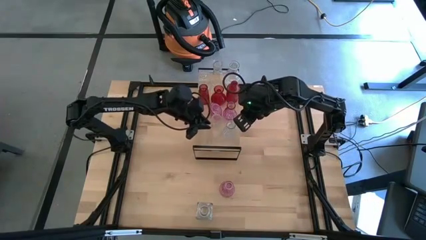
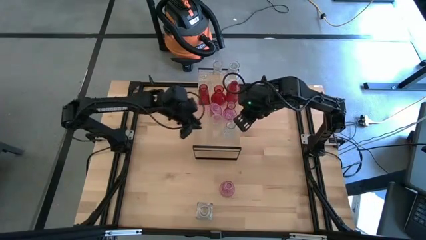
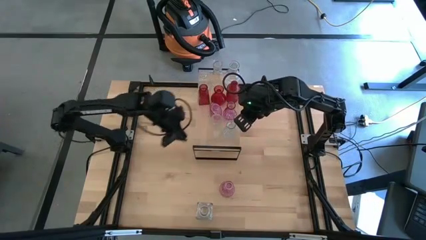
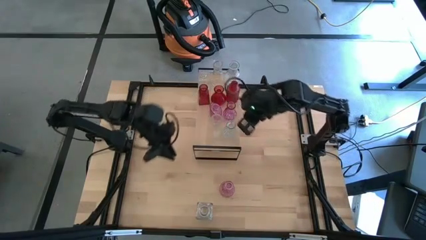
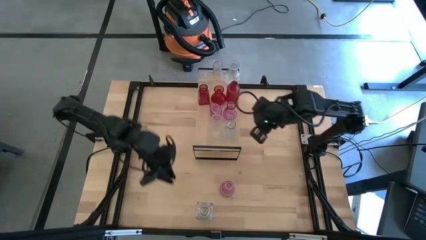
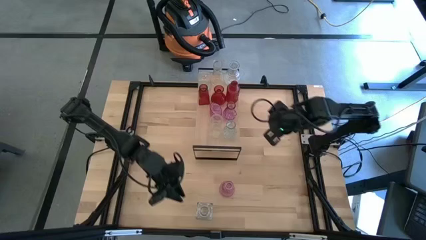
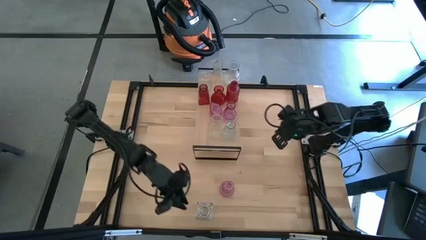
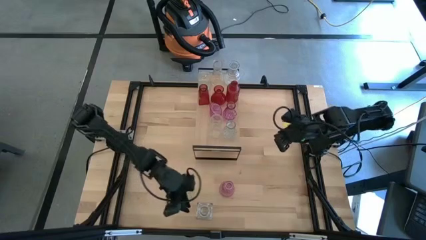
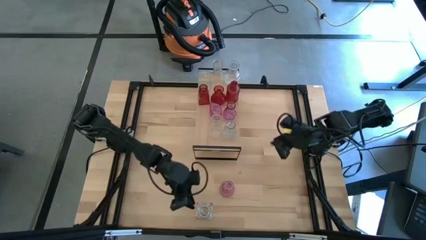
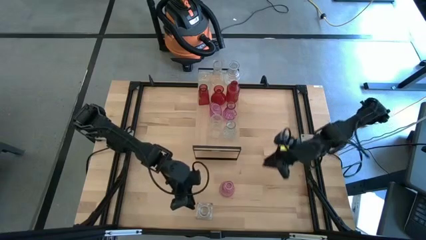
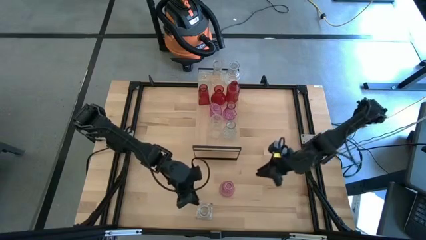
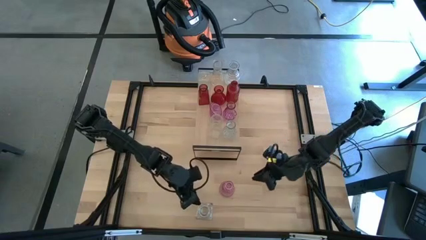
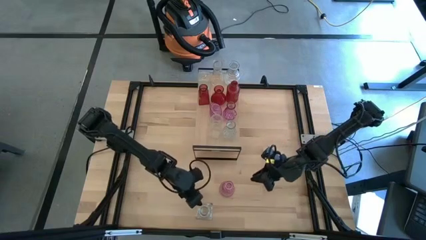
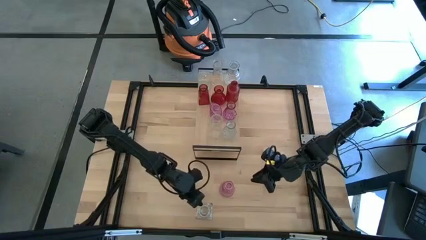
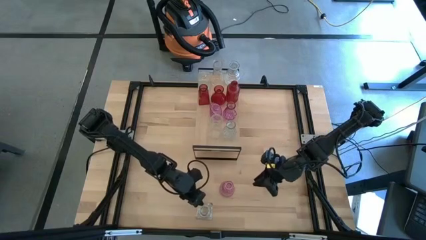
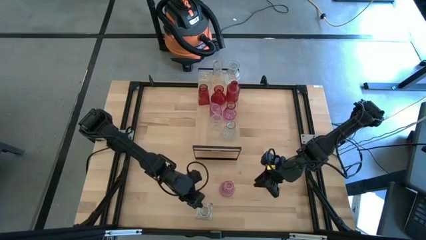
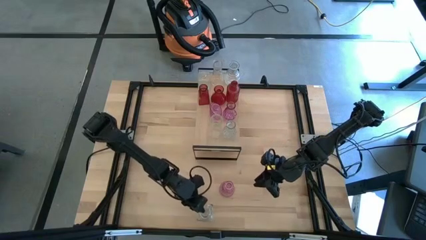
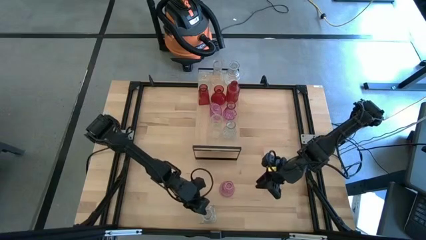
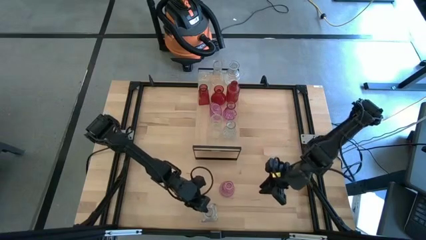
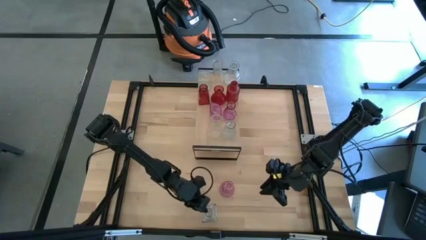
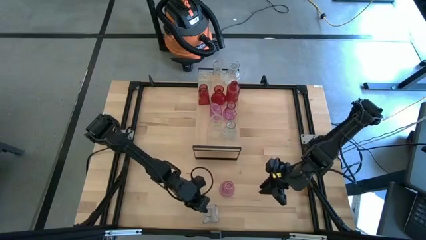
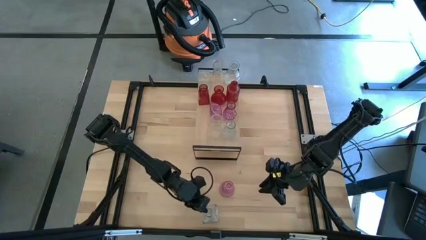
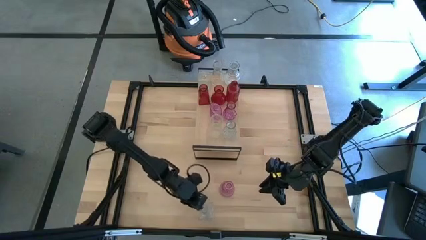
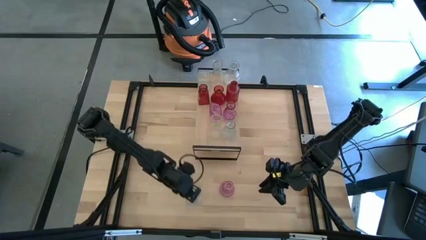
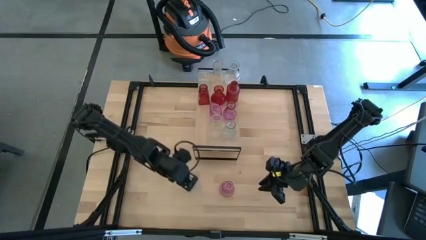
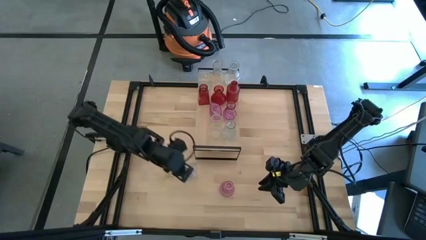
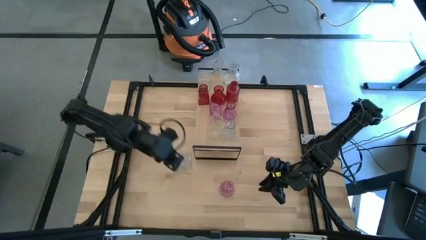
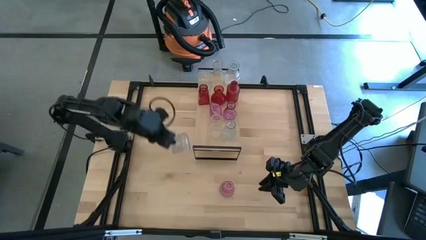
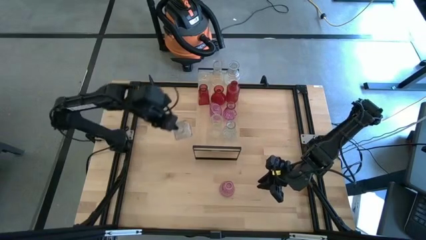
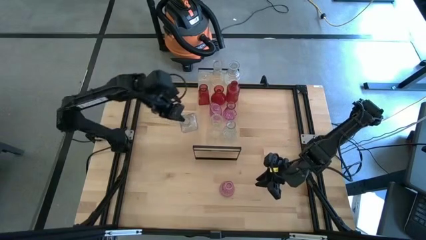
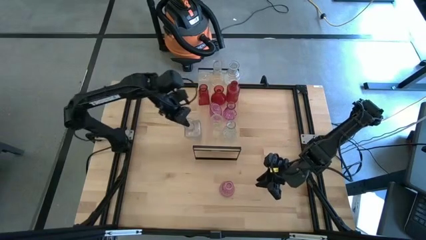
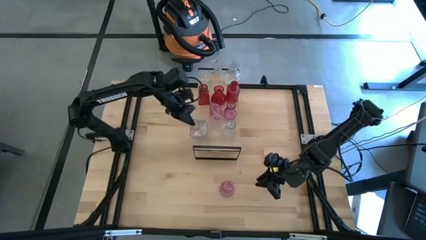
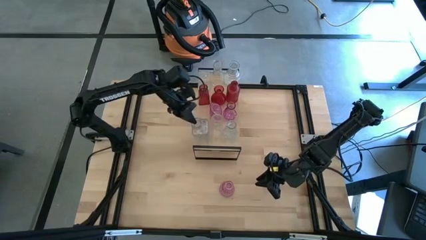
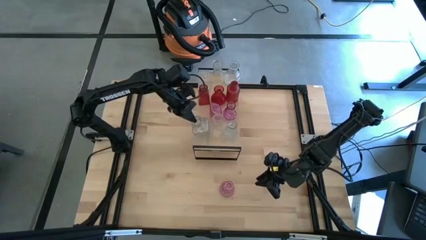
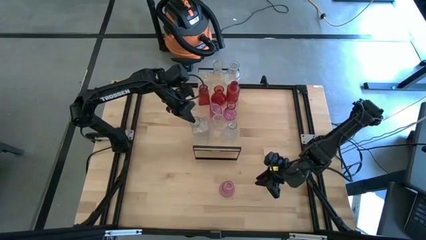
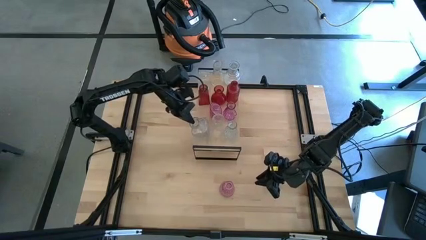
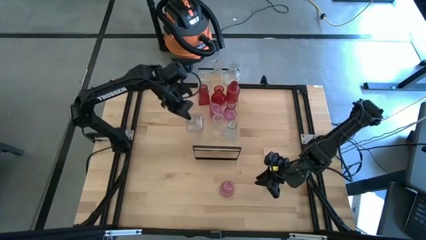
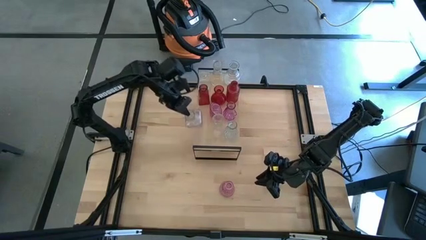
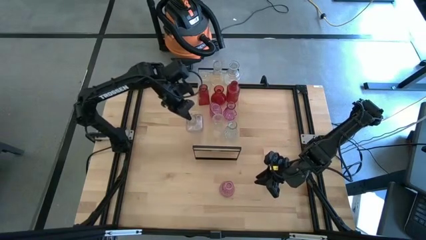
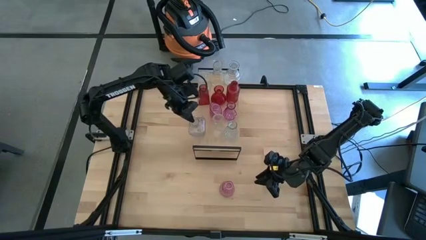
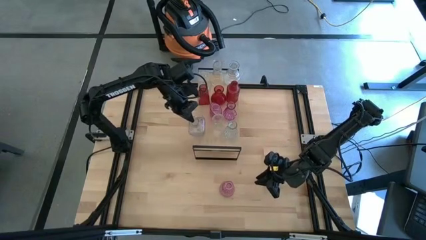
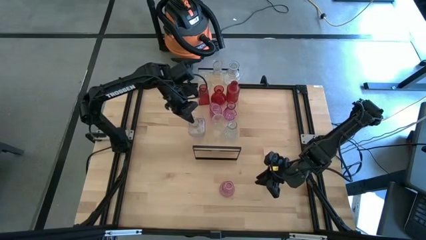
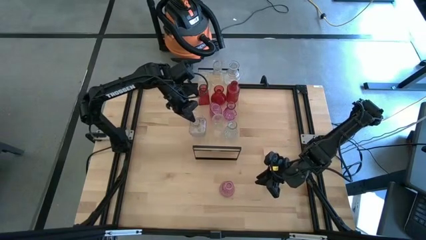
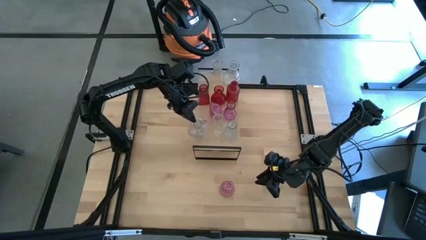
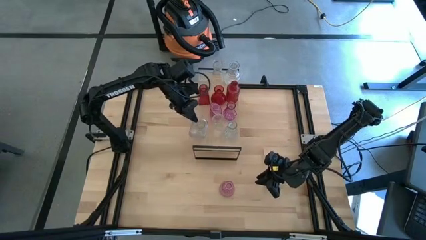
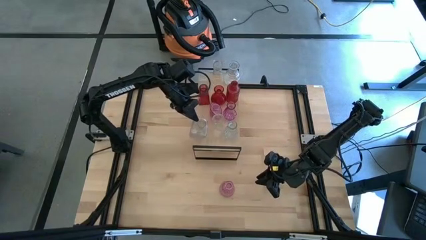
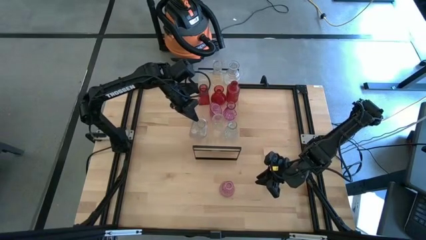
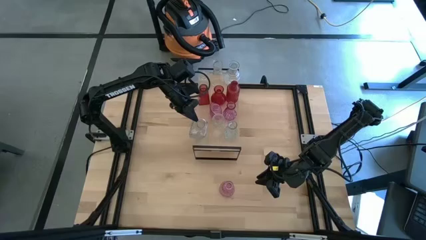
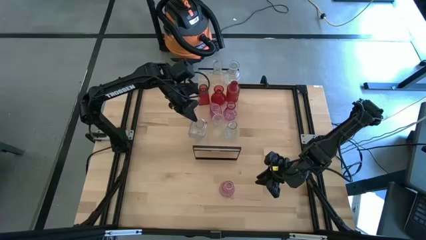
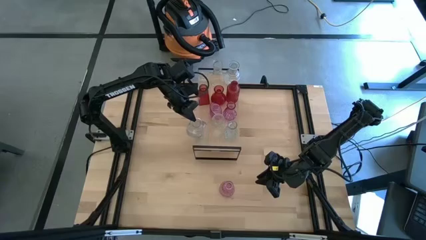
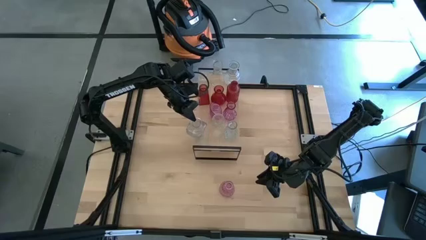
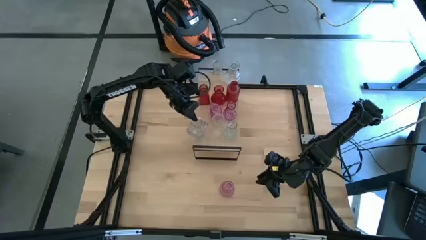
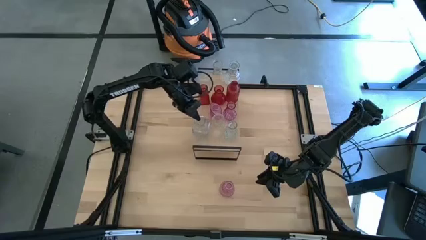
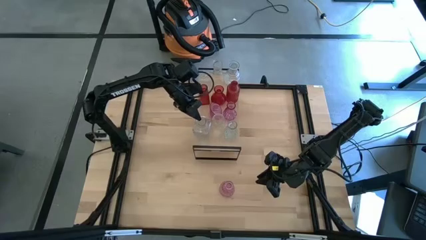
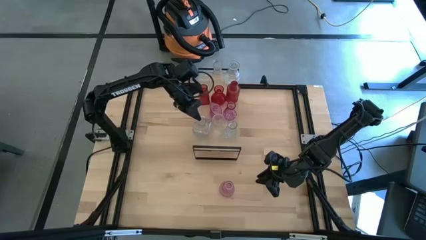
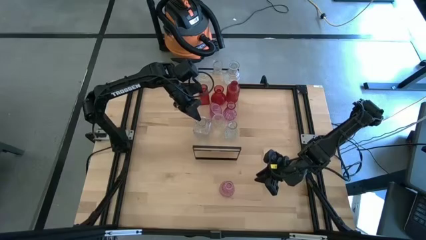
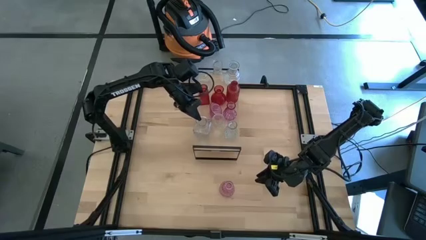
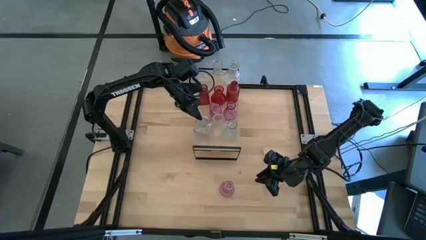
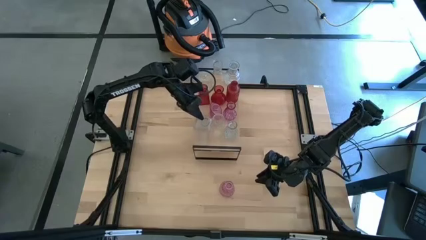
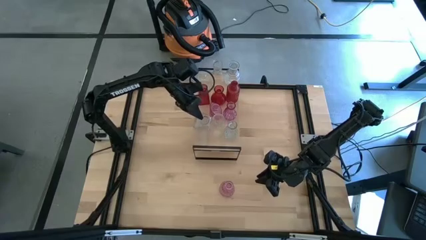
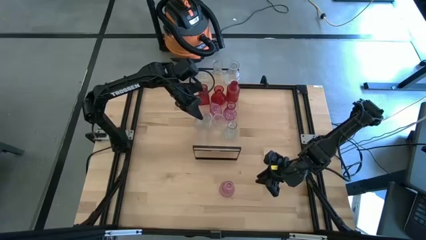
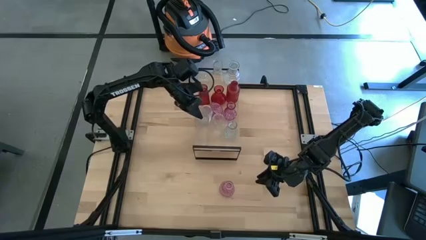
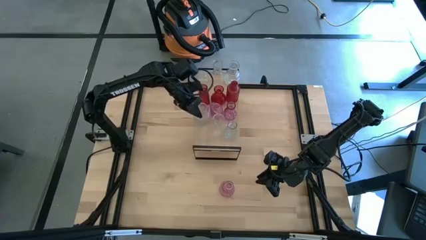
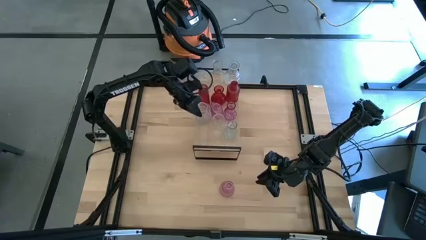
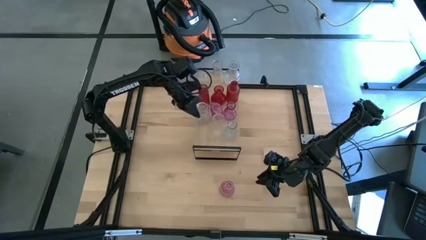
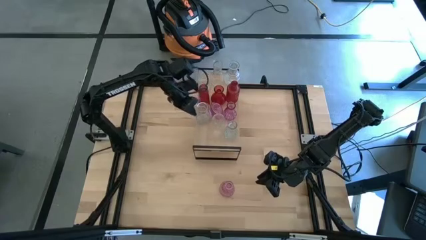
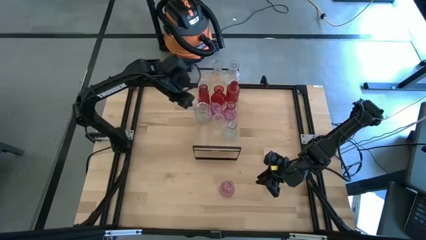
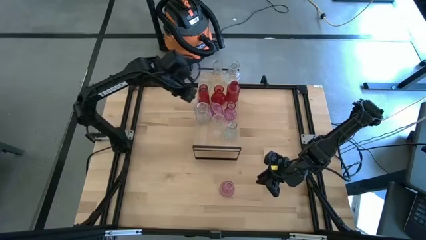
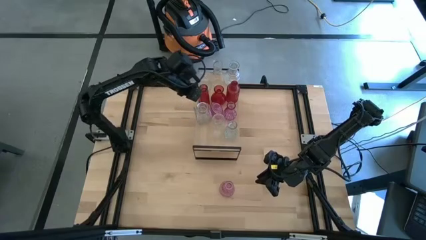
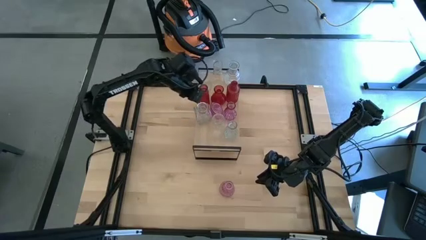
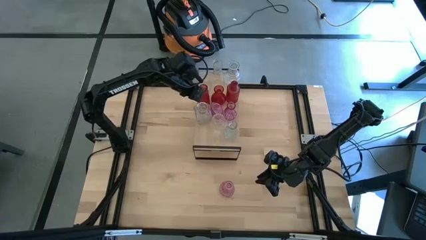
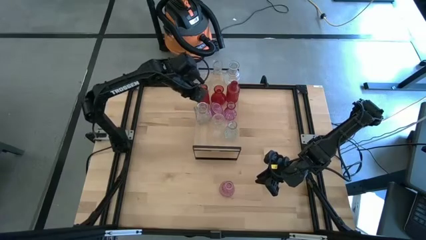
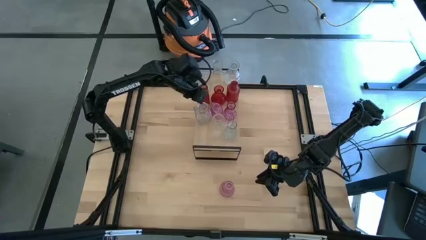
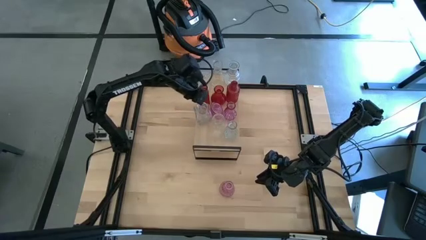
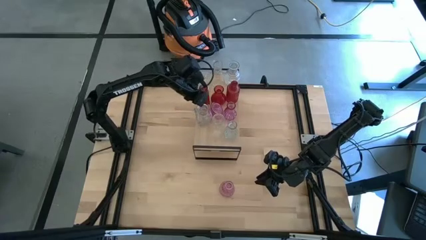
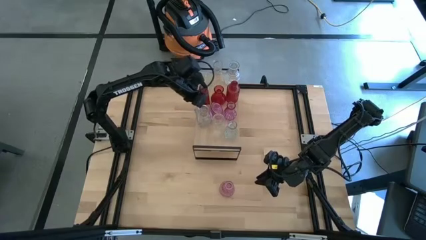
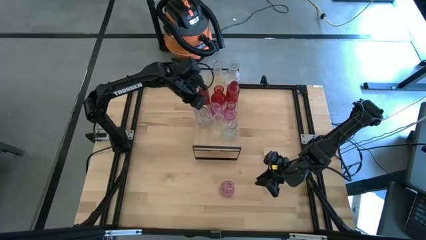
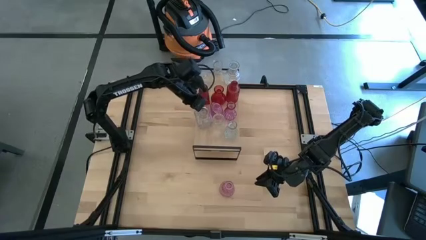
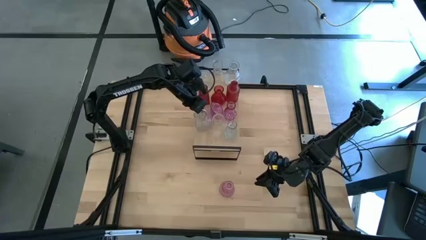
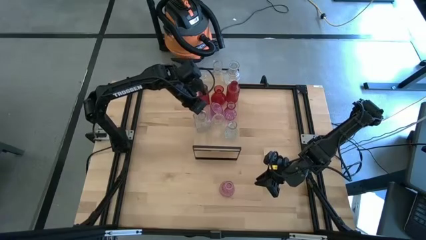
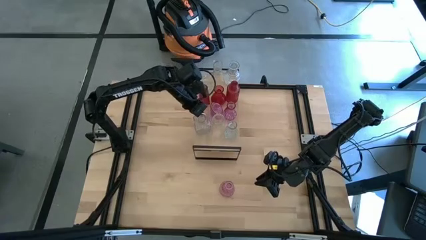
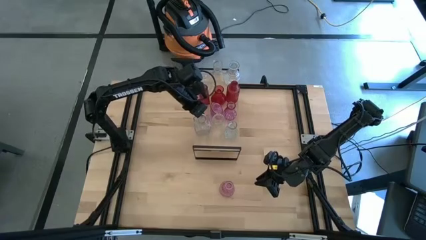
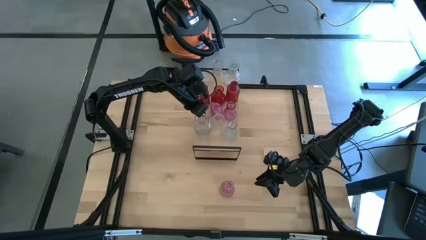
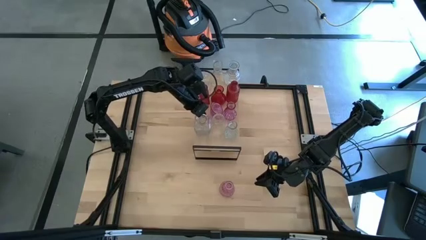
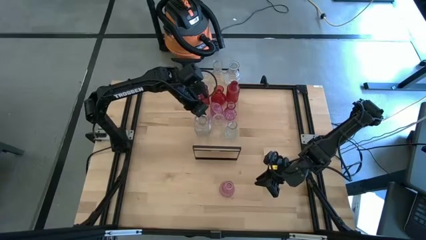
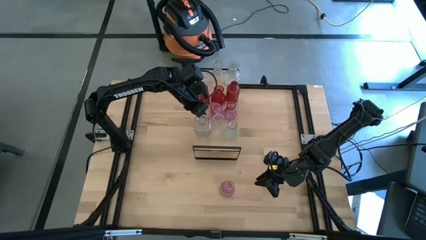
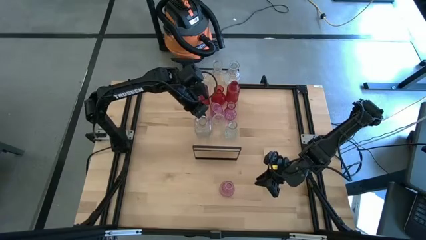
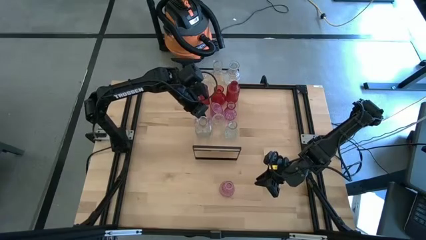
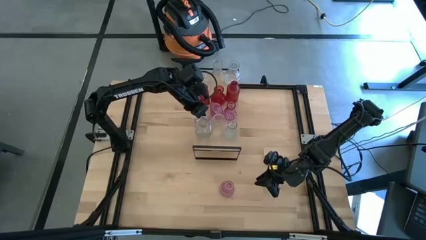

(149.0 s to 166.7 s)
Task: sort vases onto shelf
Put the transparent vase on the shelf aligned with the other transparent vases
